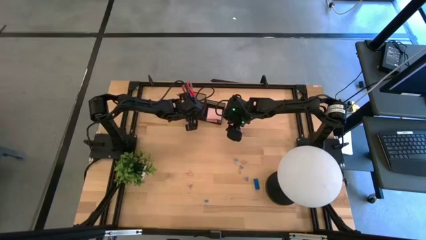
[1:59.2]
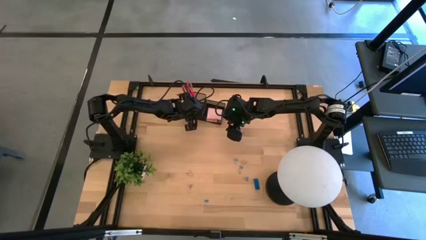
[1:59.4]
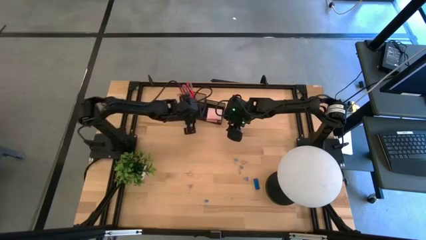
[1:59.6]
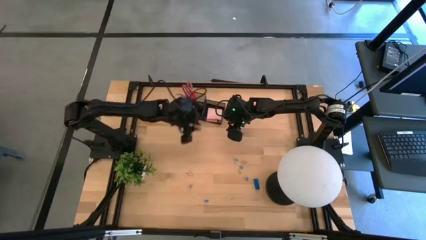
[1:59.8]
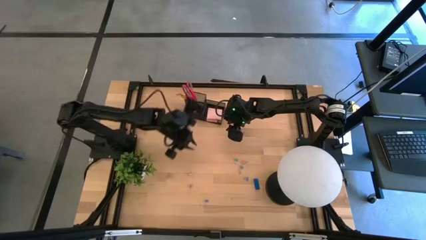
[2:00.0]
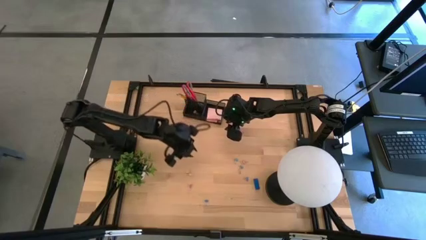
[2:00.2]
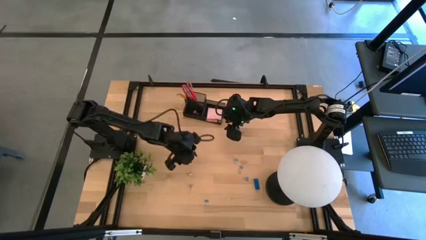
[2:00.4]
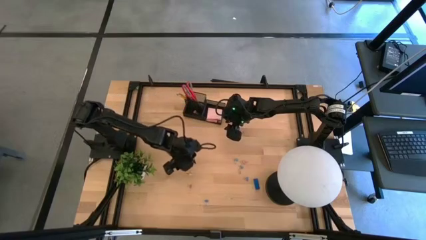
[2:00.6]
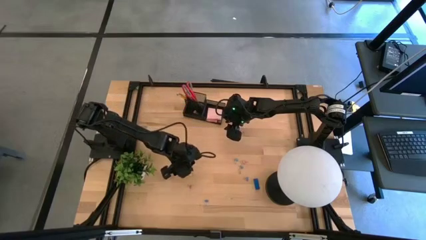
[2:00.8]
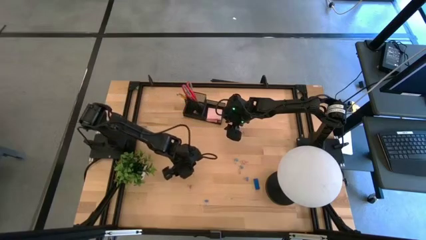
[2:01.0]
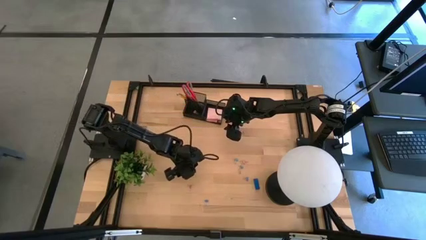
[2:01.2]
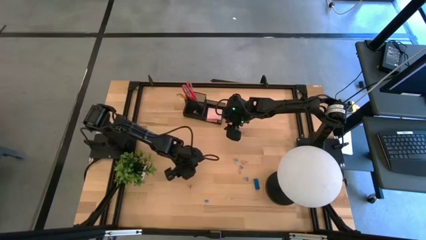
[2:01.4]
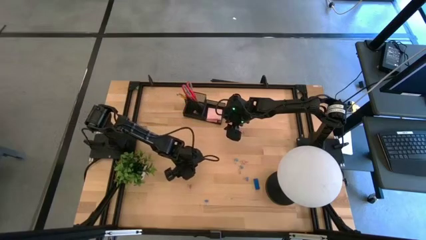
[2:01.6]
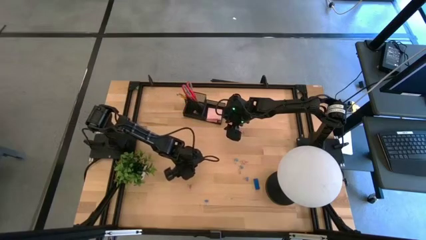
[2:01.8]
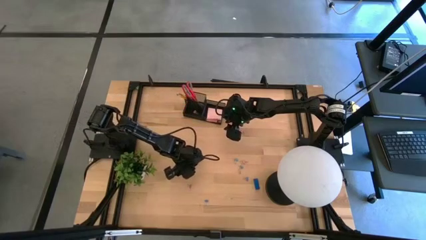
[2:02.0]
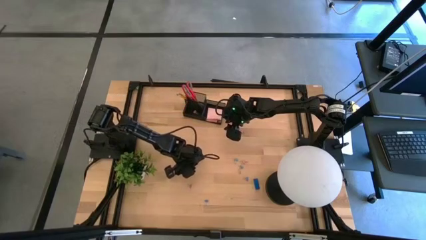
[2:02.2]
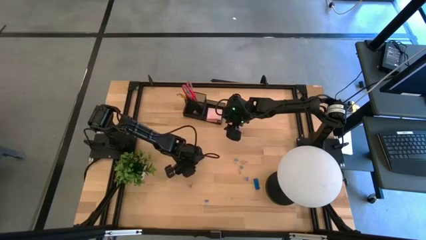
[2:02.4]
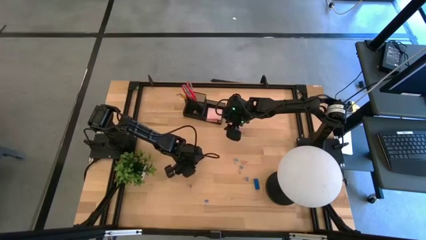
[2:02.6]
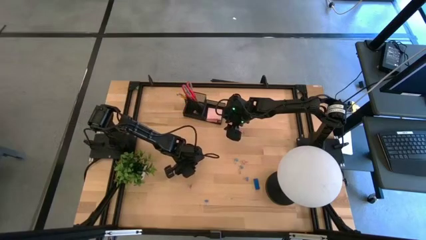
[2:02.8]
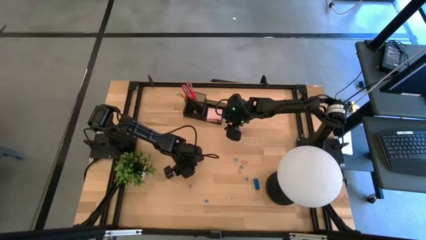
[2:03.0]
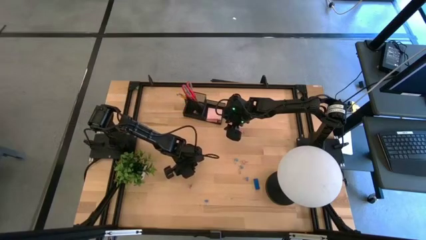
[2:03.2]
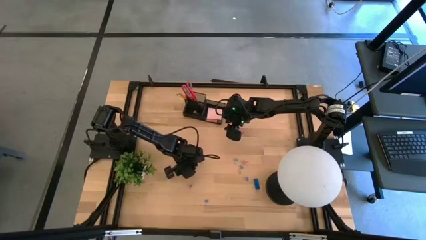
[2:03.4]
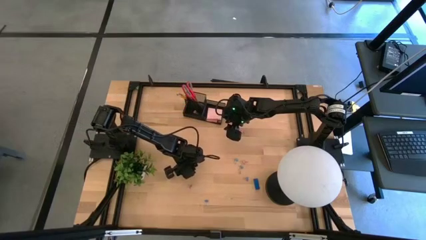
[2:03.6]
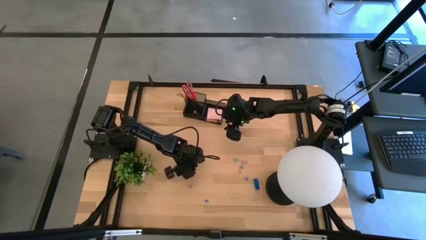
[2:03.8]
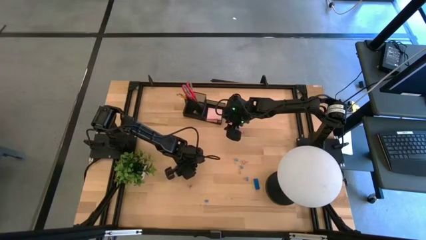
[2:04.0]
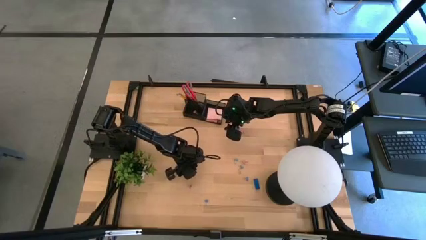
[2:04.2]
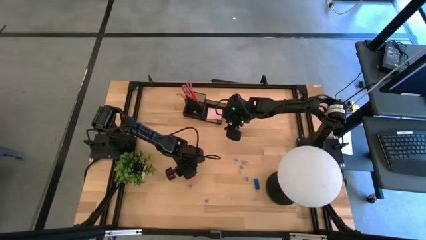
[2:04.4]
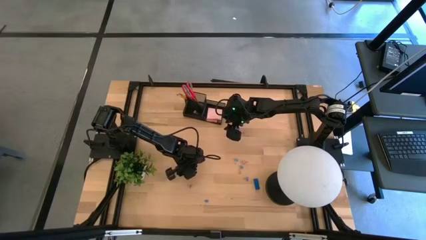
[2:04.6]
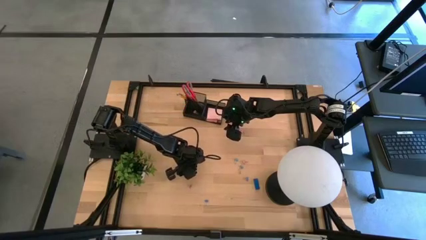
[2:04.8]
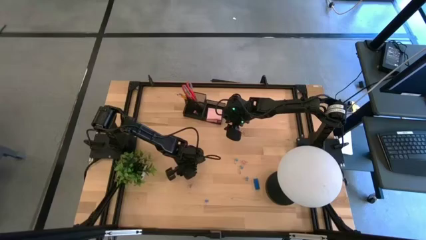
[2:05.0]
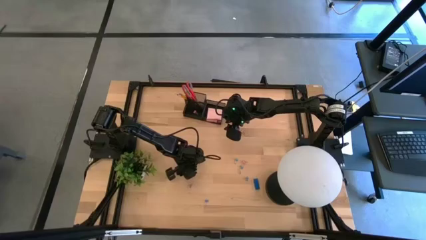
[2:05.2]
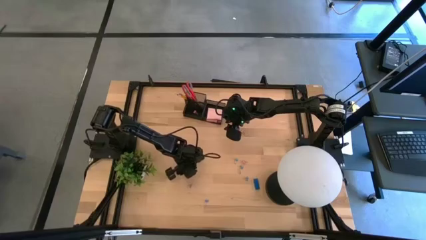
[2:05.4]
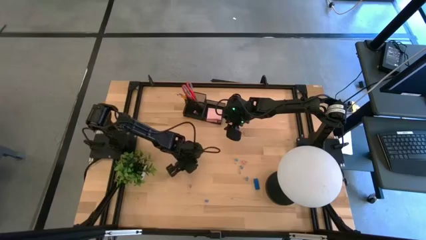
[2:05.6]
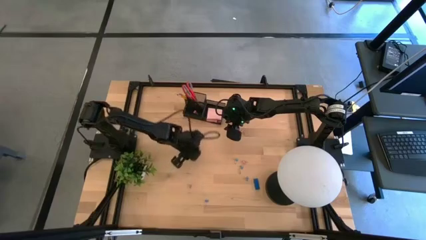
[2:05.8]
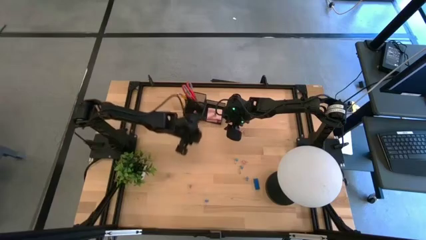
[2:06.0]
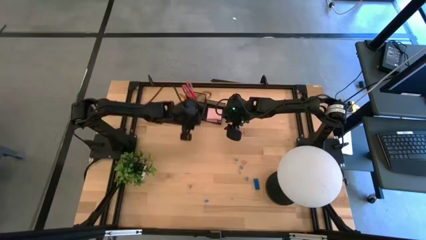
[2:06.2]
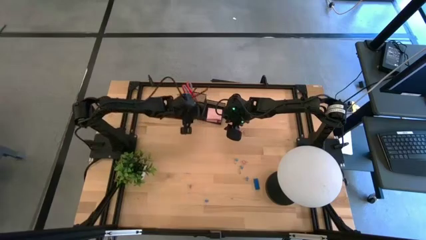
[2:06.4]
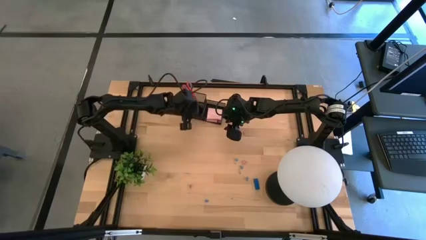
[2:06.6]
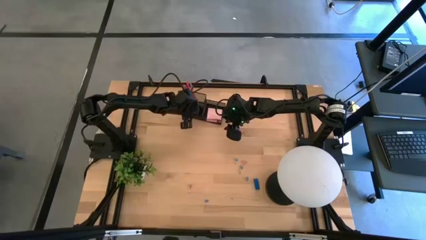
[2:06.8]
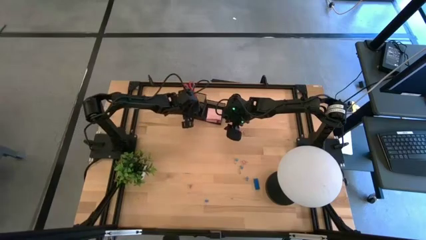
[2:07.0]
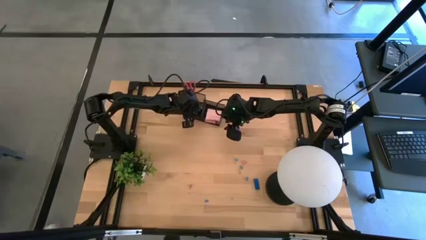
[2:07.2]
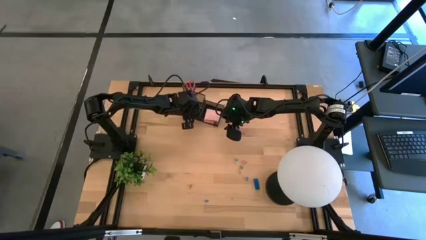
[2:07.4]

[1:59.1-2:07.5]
Task: Pick and place office supplies into organizer
Put the yellow binder clip into the black desk organizer

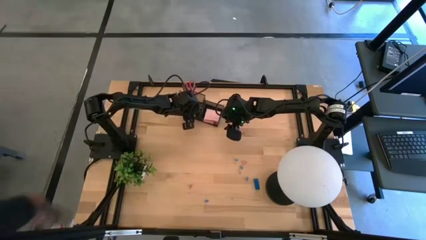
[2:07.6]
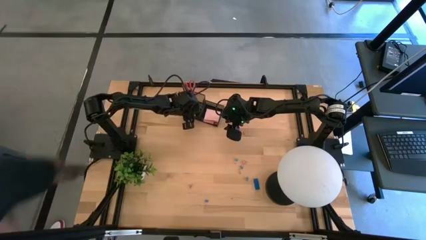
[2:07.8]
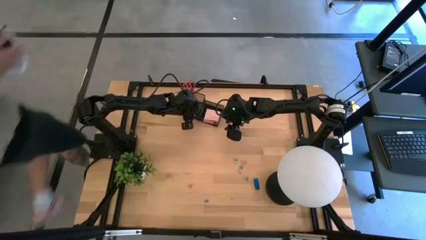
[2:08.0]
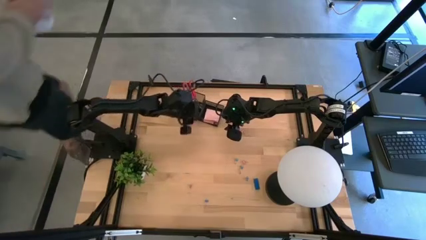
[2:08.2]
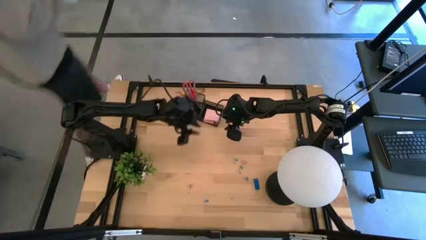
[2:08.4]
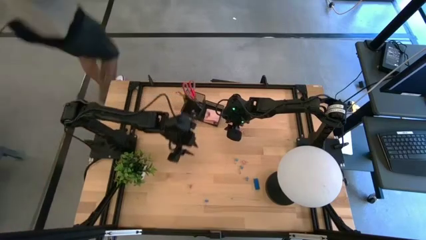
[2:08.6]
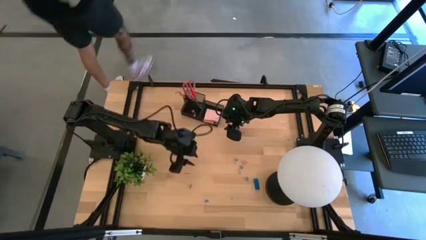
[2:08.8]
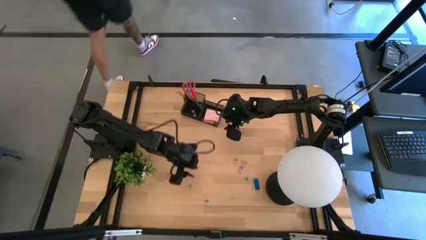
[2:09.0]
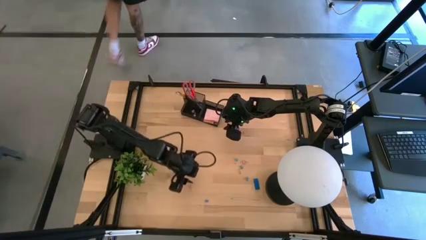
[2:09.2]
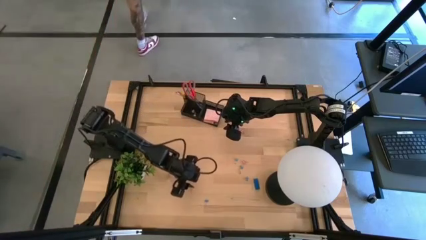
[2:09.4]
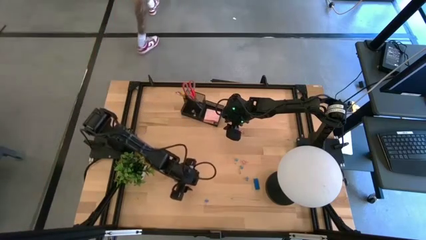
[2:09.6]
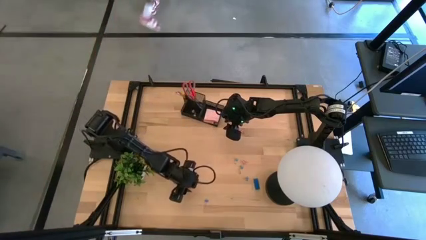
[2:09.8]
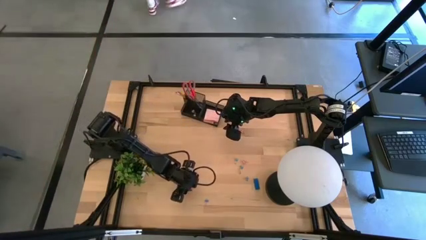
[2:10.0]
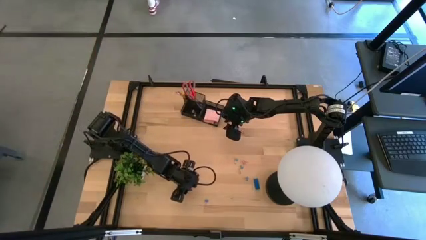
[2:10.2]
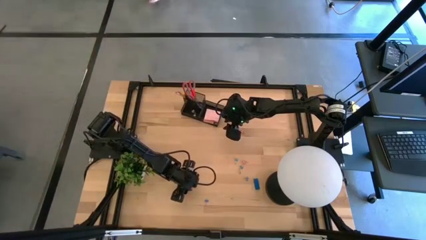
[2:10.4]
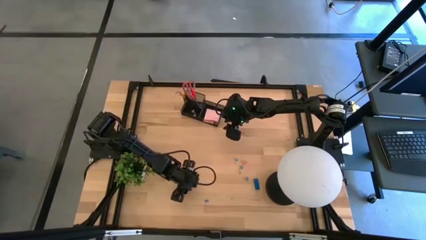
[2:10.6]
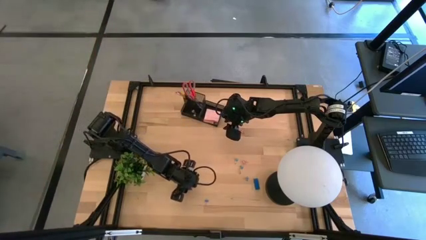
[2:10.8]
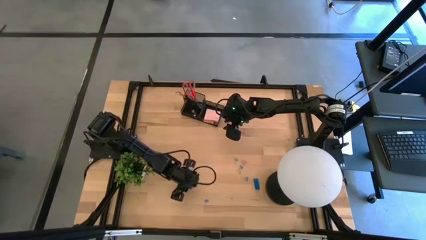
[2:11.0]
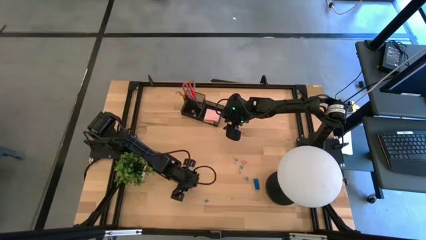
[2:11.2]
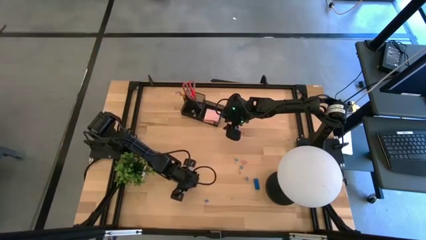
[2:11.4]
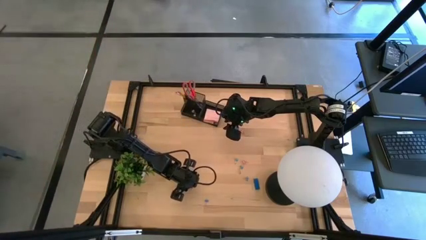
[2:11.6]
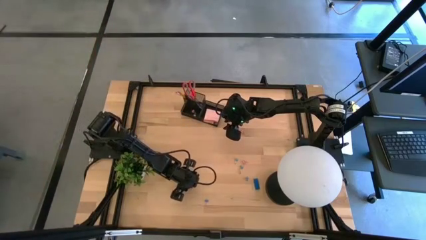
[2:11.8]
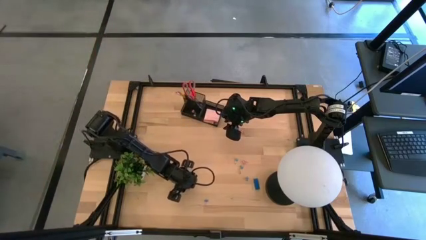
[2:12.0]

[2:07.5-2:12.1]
Put the pink binder clip into the black desk organizer

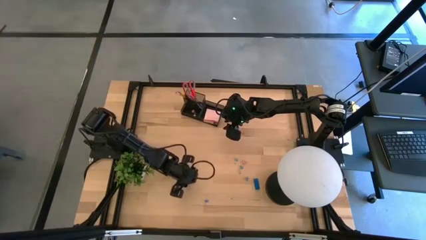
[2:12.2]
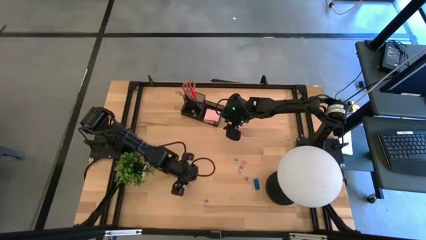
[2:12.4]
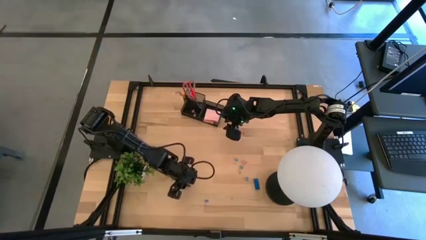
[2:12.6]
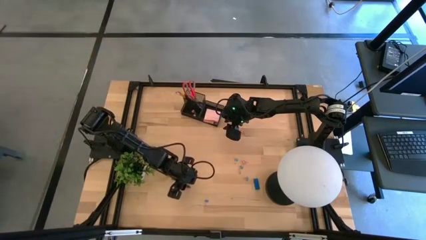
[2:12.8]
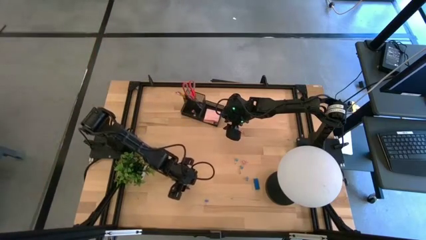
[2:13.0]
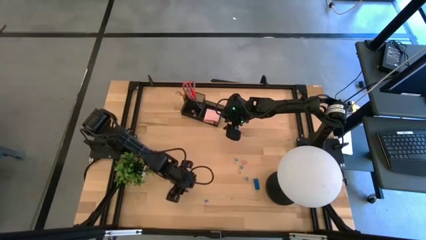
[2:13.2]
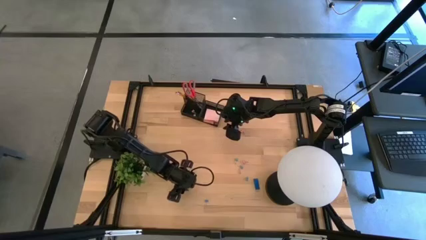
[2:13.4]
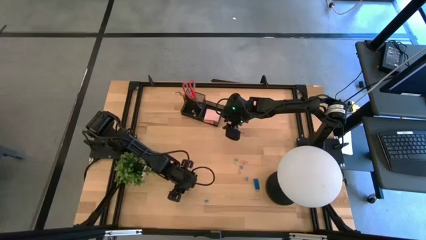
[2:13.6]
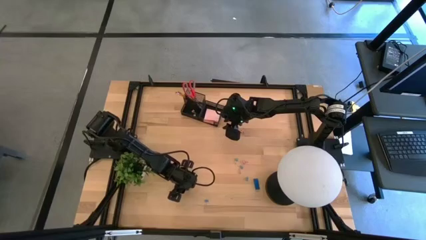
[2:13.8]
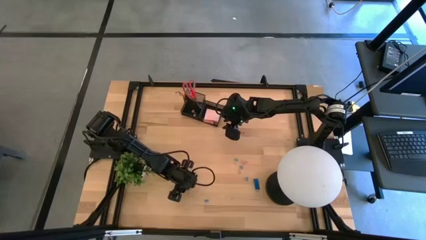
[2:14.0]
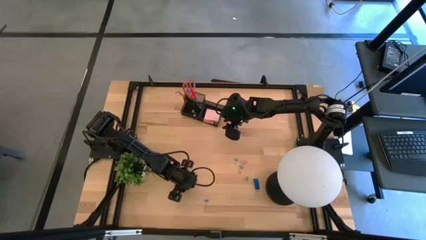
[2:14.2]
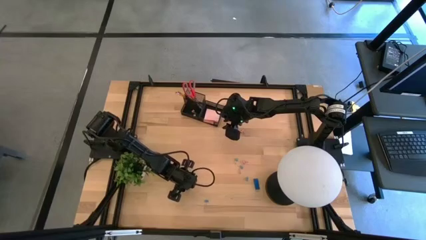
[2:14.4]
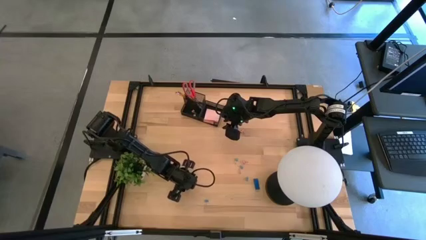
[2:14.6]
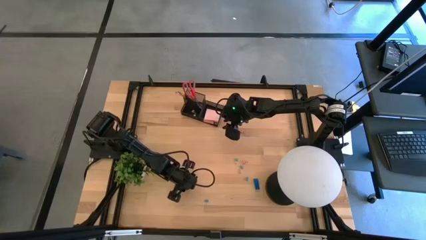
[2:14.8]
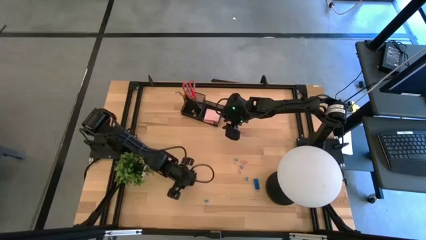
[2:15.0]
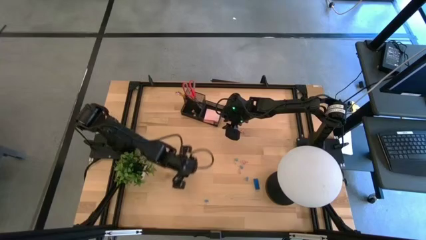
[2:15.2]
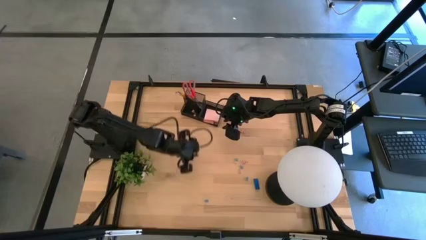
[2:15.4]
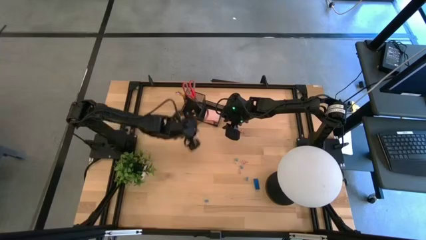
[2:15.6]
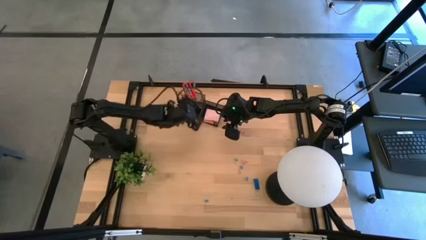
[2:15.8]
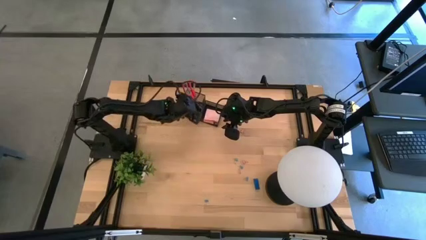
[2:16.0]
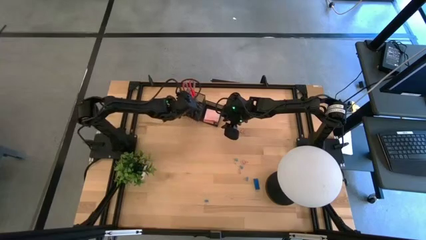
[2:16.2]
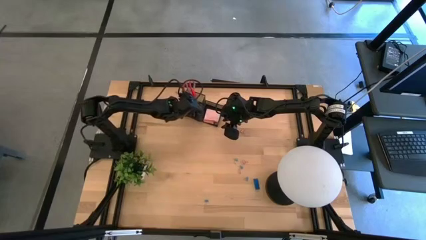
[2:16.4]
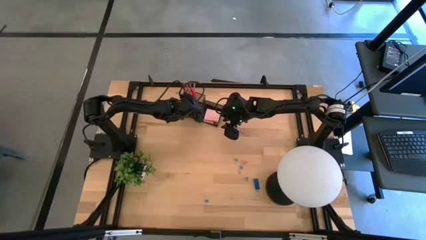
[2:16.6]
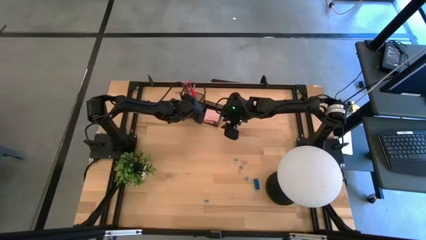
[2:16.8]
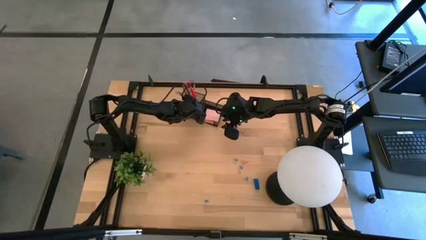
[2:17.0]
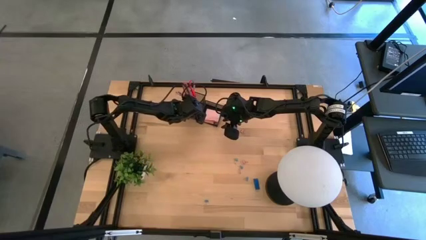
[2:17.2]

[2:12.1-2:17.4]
Put the pink binder clip into the black desk organizer
